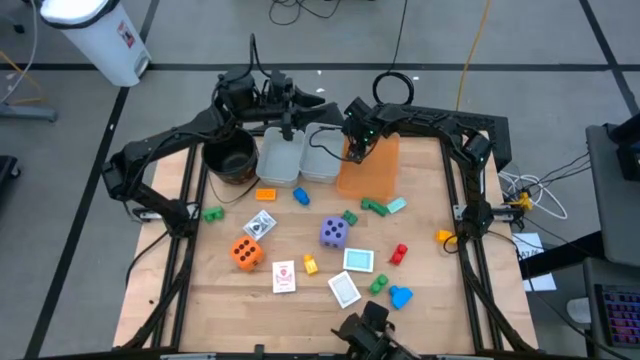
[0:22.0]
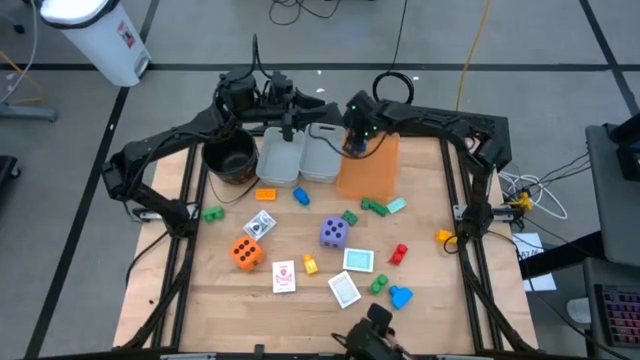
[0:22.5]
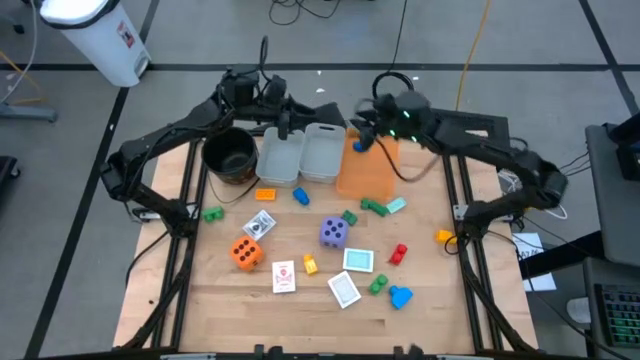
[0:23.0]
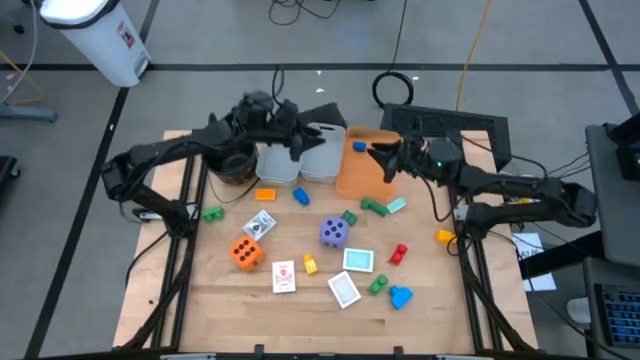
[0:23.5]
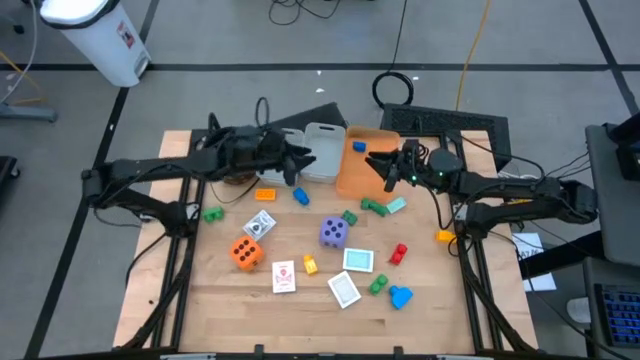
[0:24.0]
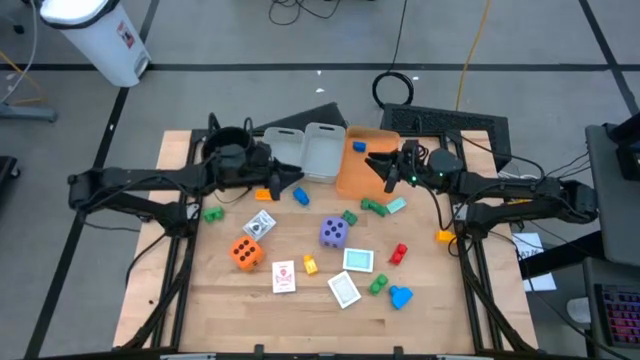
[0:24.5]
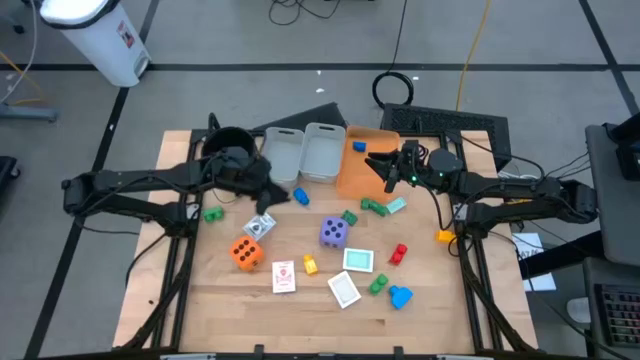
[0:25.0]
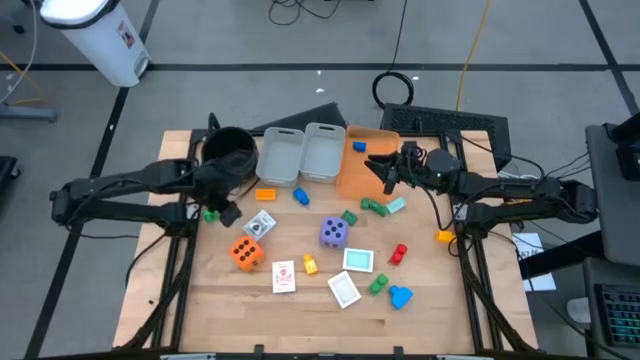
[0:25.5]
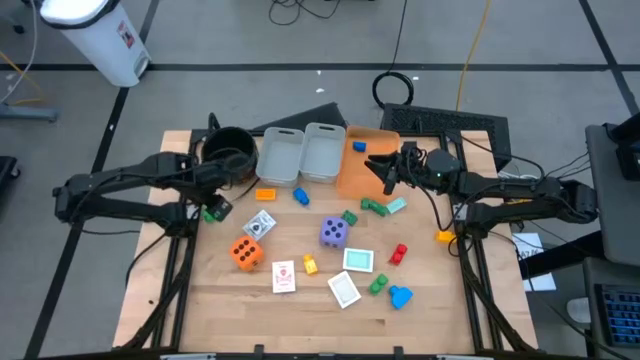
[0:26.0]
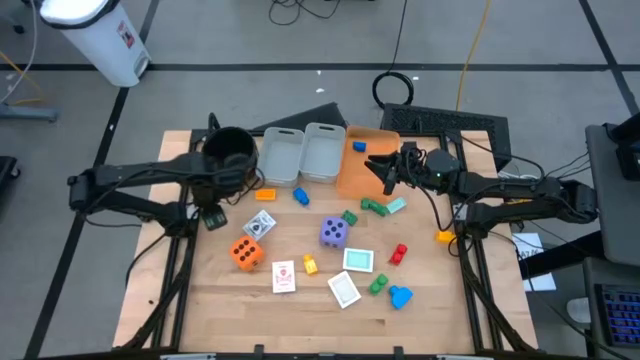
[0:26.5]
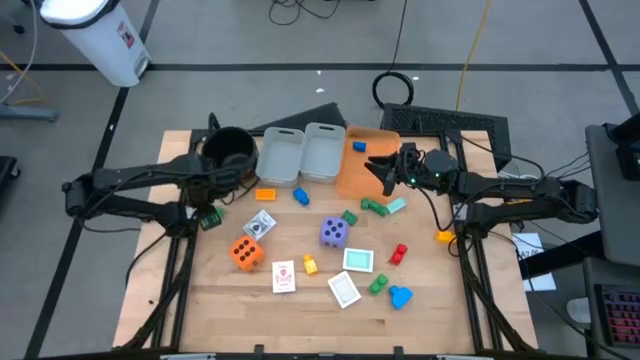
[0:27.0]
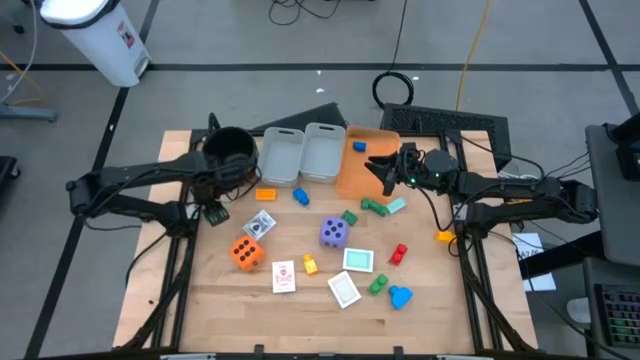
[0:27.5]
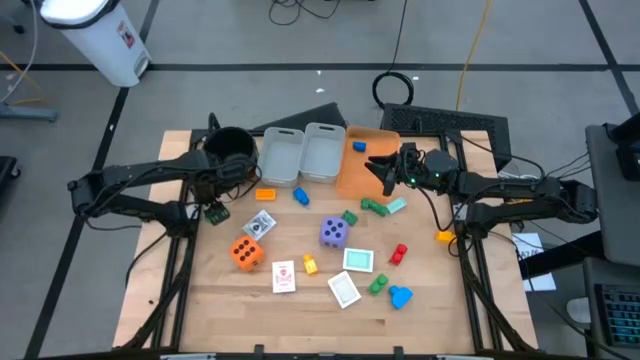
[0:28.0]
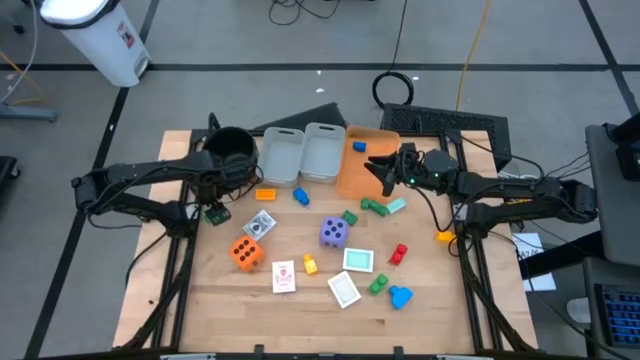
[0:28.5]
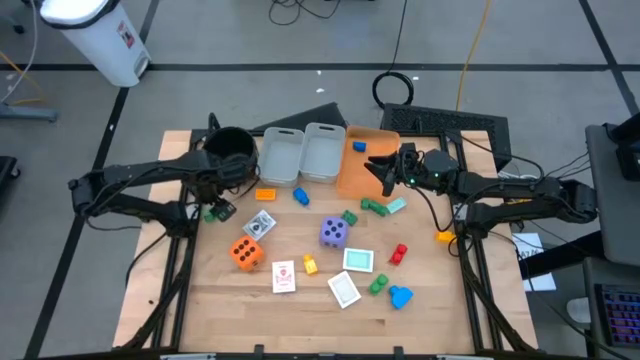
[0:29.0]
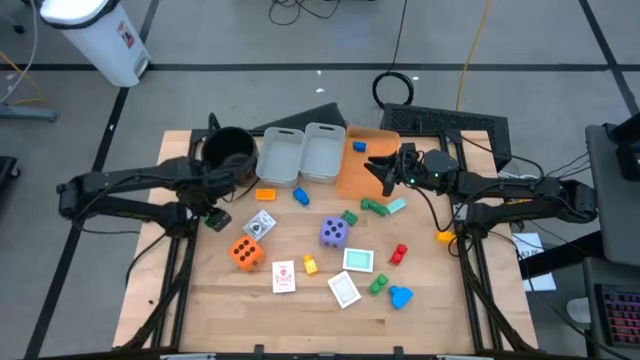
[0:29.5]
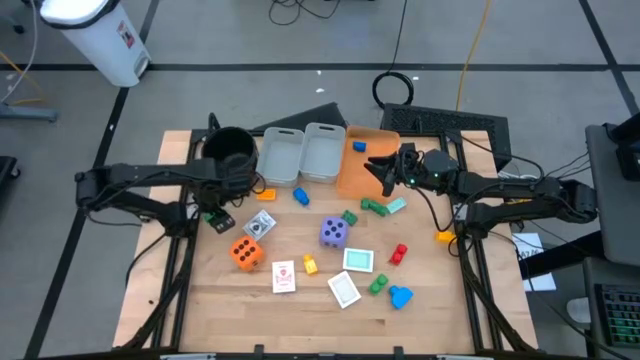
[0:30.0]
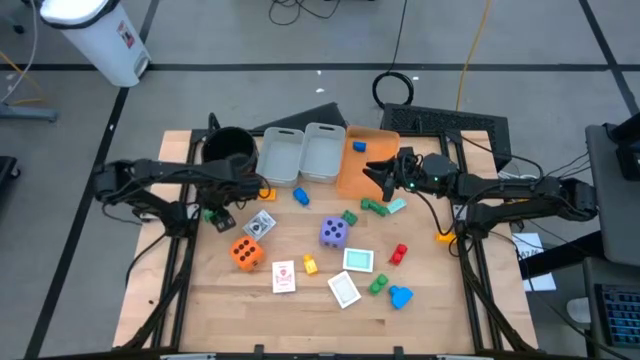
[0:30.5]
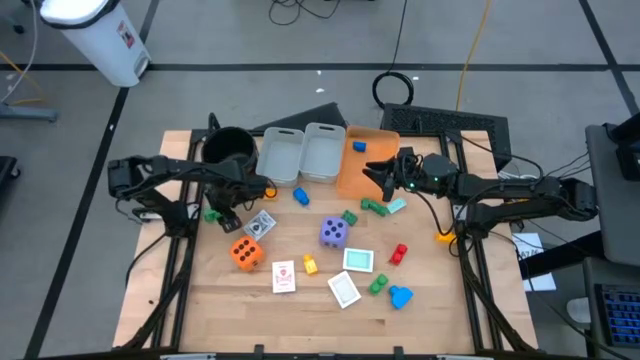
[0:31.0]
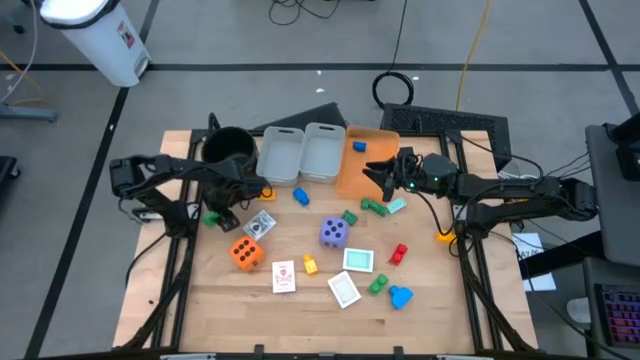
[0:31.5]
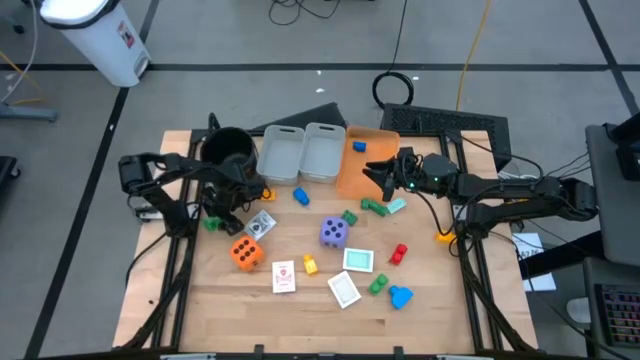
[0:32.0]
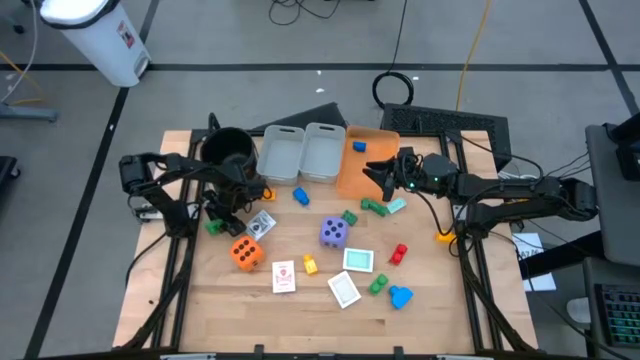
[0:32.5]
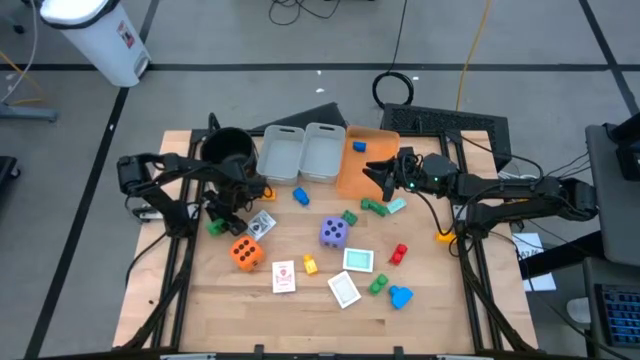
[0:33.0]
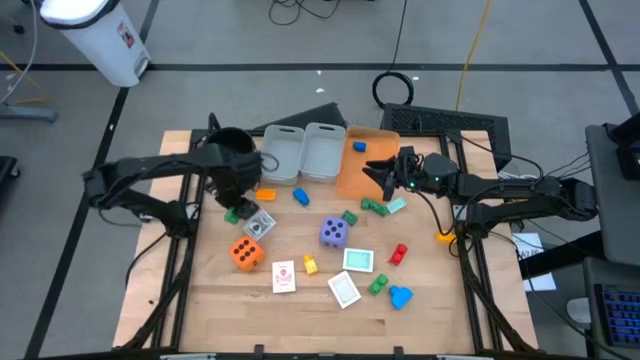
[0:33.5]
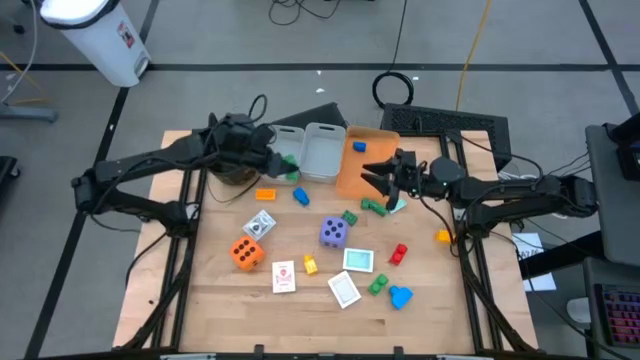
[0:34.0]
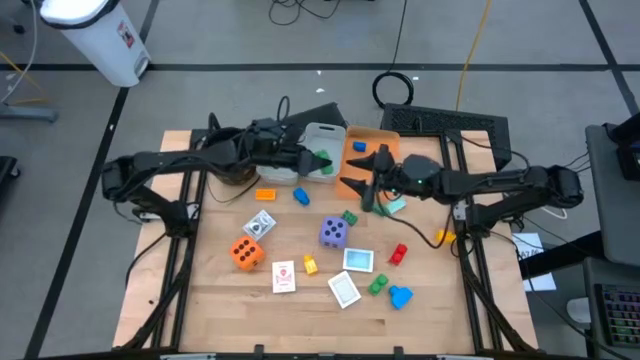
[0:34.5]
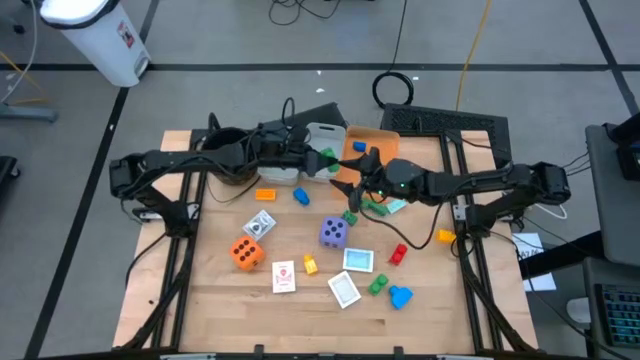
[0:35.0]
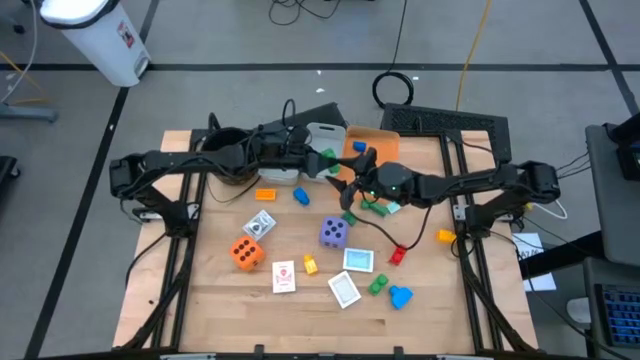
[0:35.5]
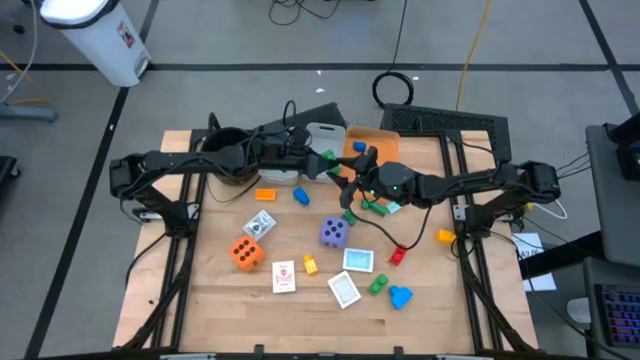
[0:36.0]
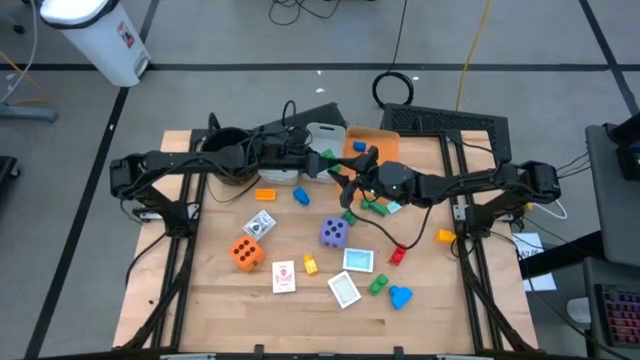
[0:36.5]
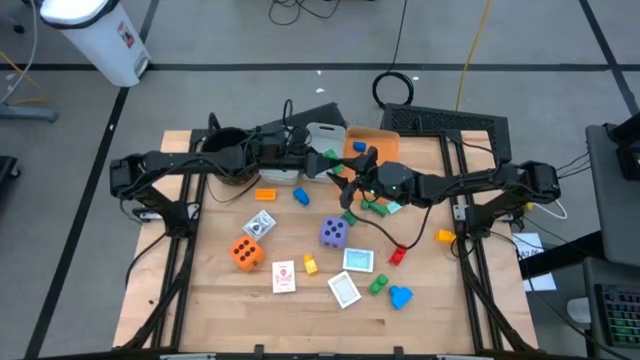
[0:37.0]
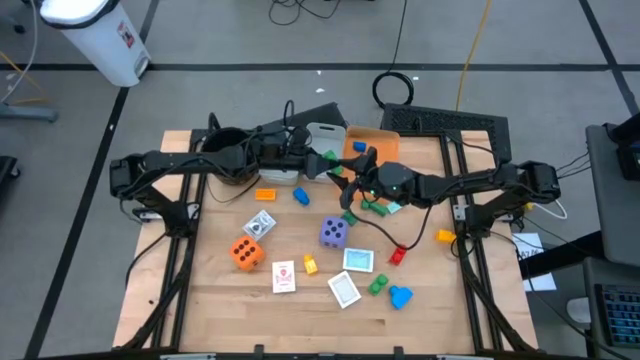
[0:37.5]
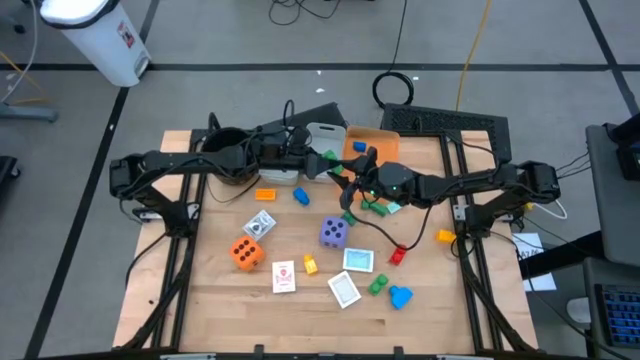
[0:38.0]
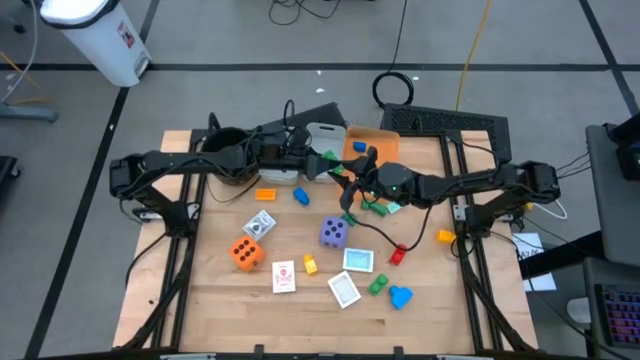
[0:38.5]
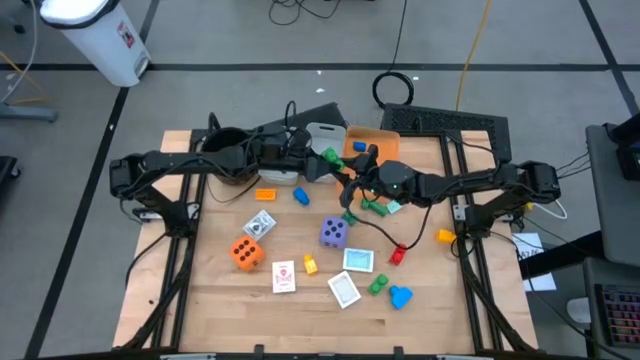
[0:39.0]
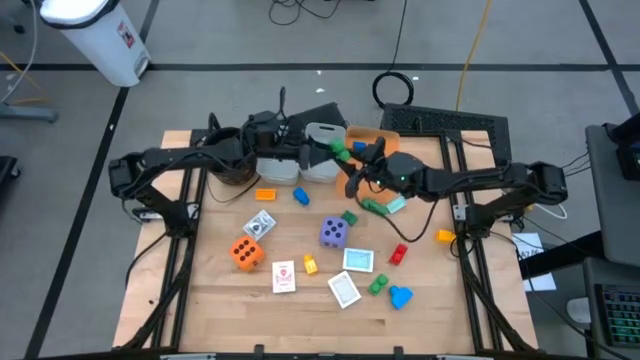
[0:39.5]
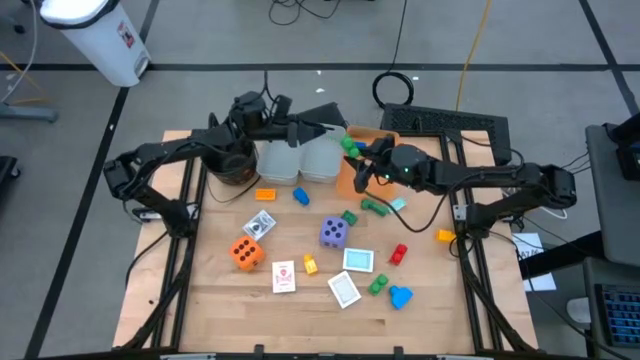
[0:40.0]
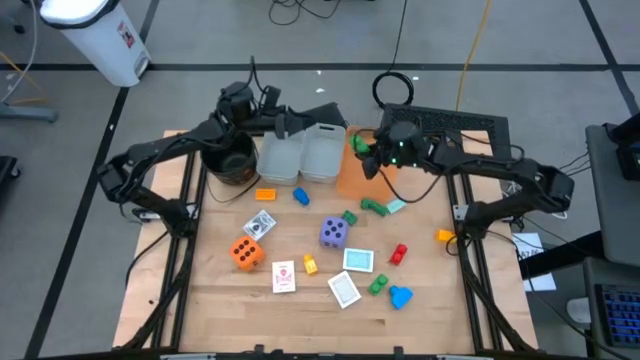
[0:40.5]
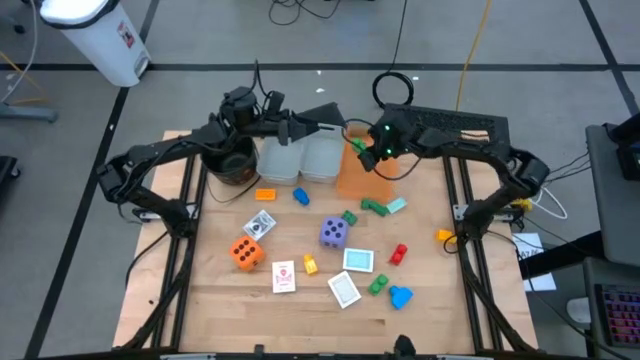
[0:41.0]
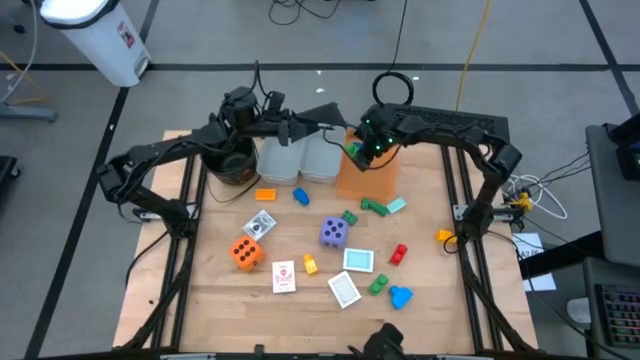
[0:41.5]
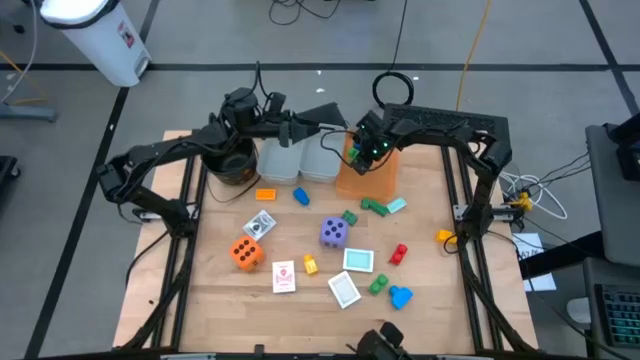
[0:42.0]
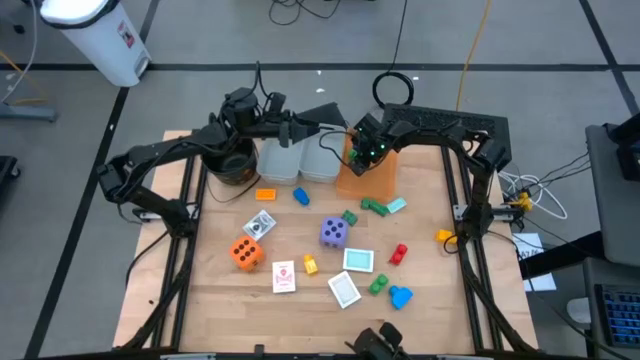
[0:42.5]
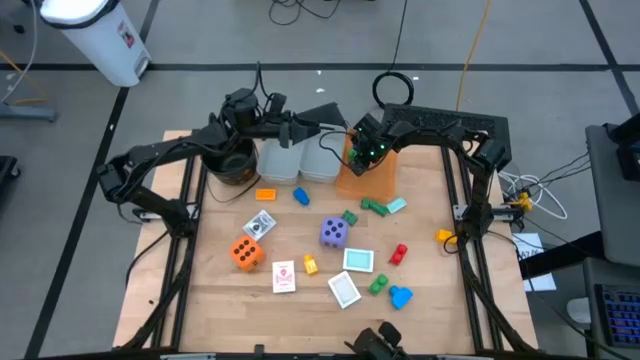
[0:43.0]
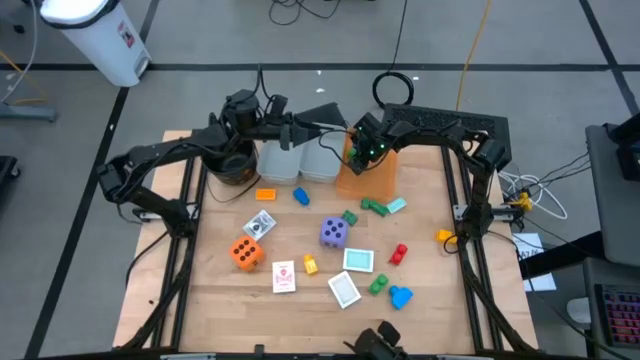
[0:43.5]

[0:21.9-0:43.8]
Task: Pick & Place Toys
Put the top light green game piece into the orange bin
